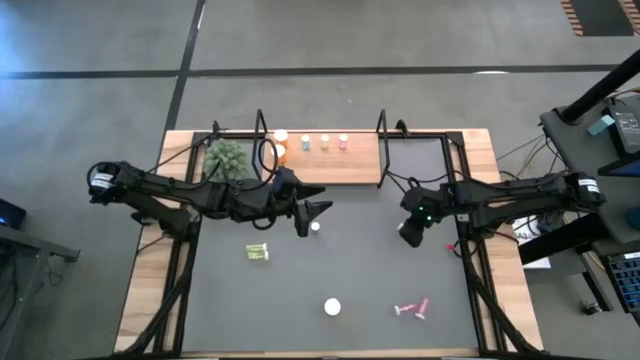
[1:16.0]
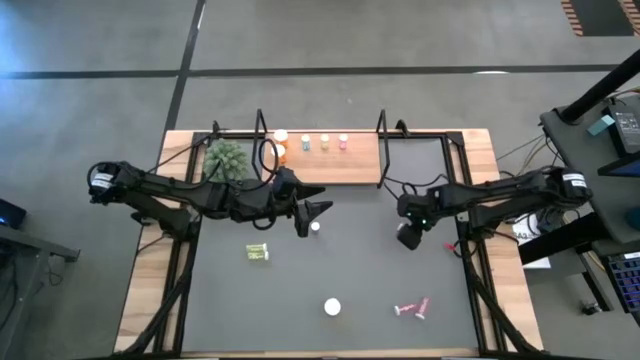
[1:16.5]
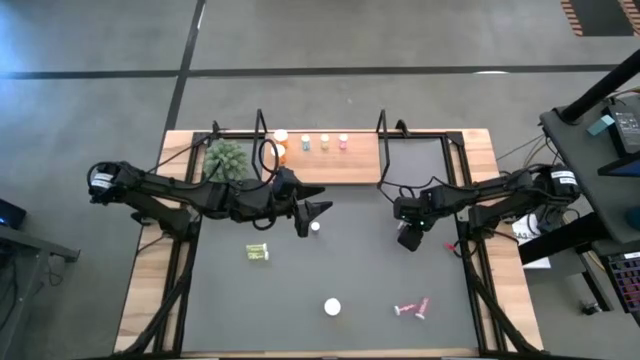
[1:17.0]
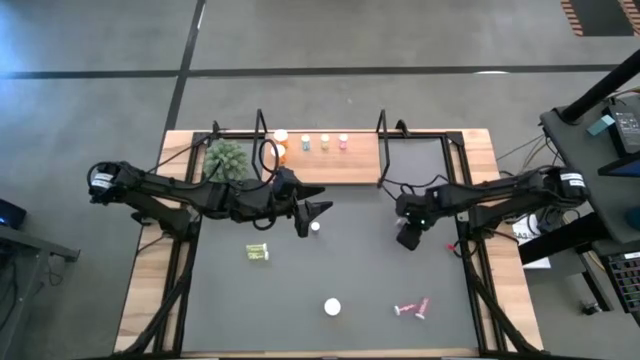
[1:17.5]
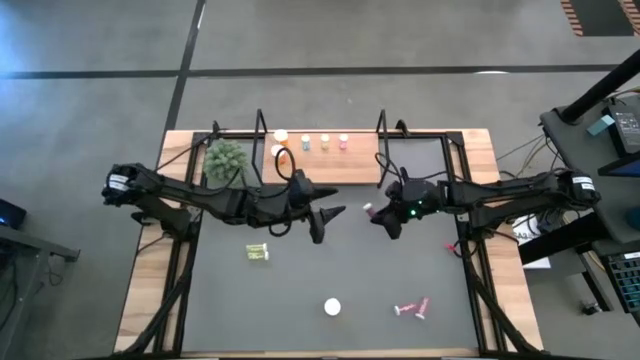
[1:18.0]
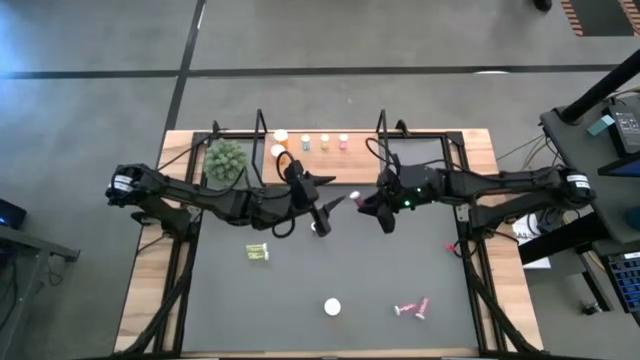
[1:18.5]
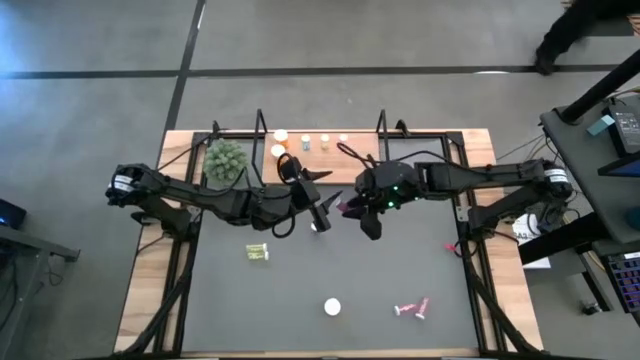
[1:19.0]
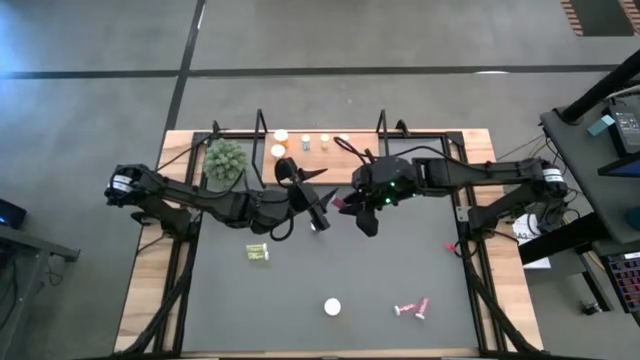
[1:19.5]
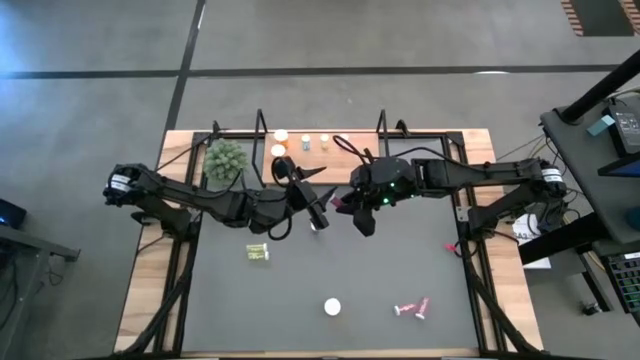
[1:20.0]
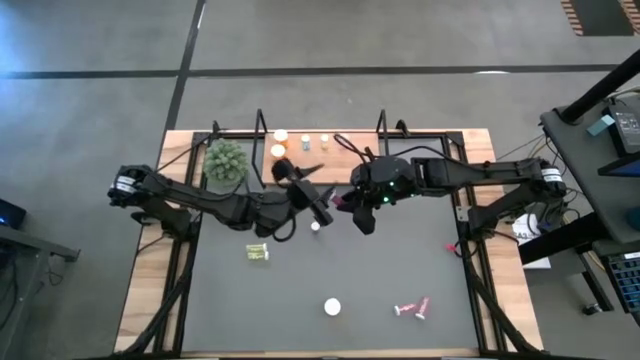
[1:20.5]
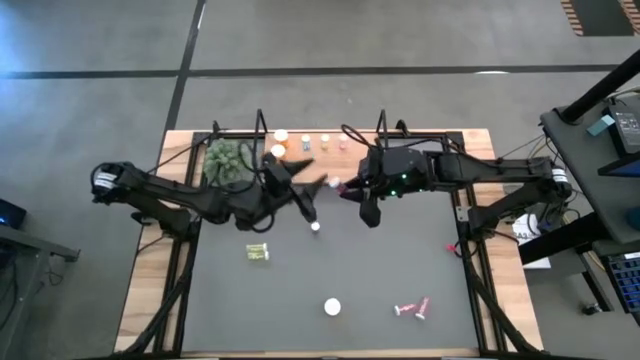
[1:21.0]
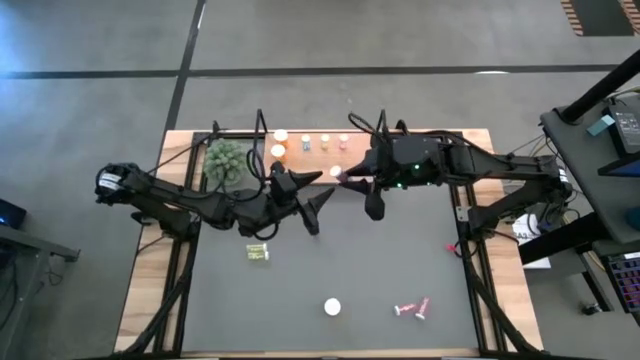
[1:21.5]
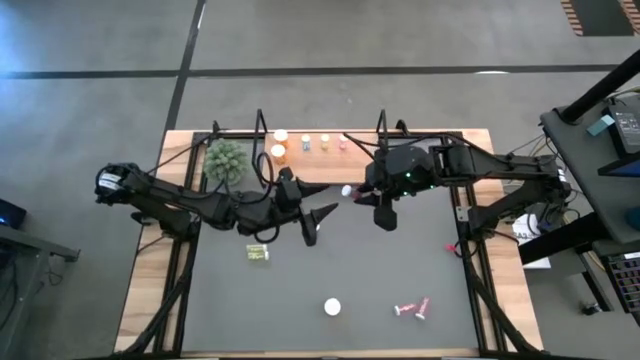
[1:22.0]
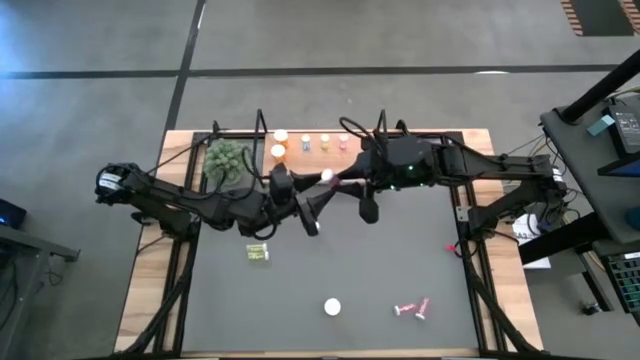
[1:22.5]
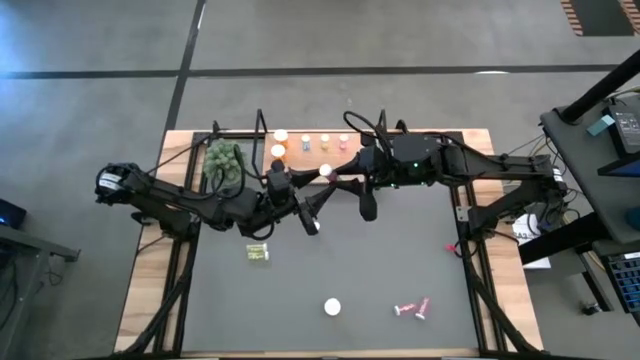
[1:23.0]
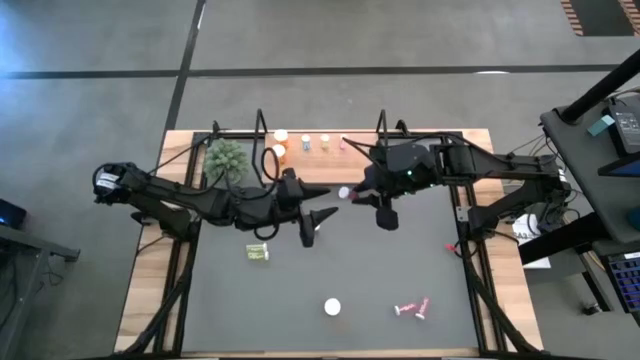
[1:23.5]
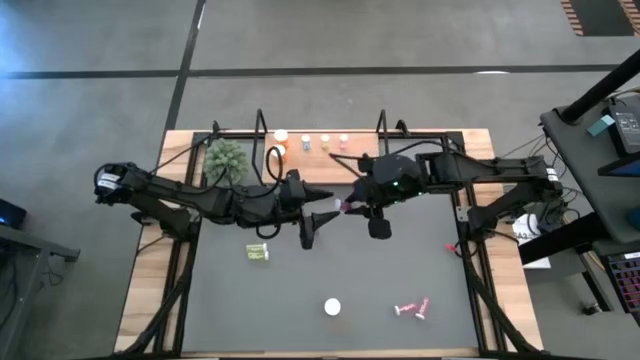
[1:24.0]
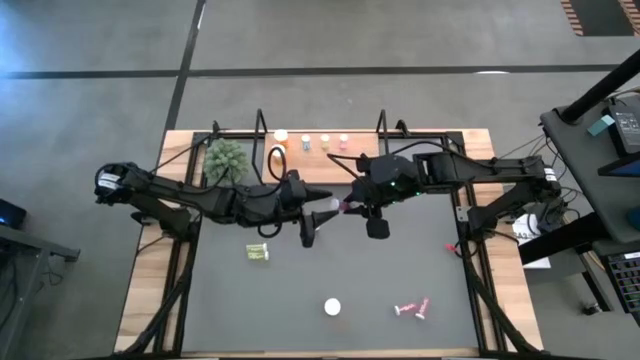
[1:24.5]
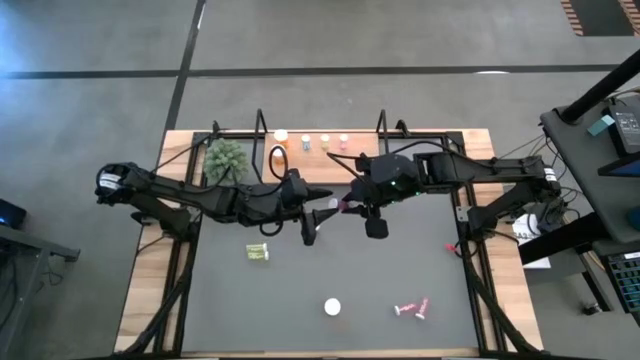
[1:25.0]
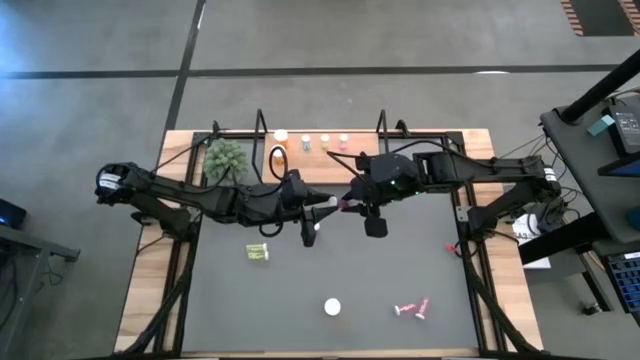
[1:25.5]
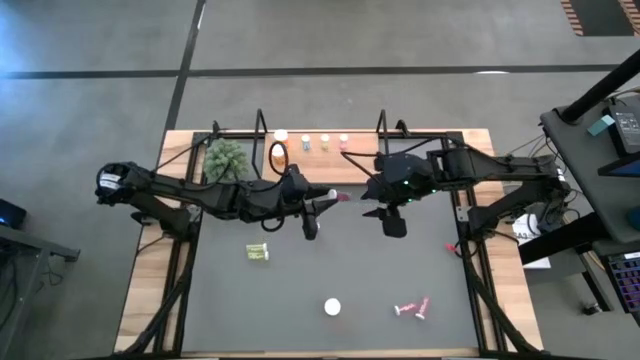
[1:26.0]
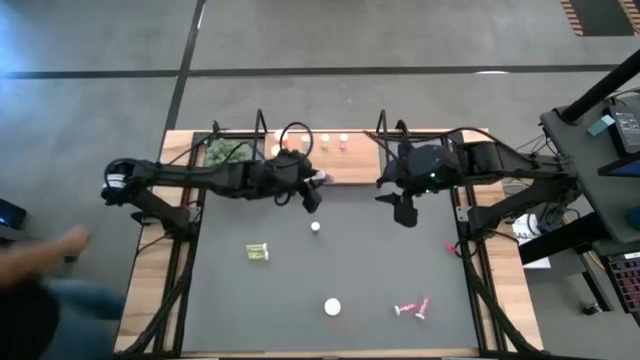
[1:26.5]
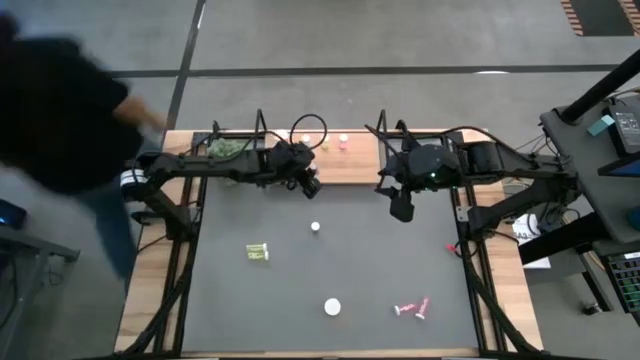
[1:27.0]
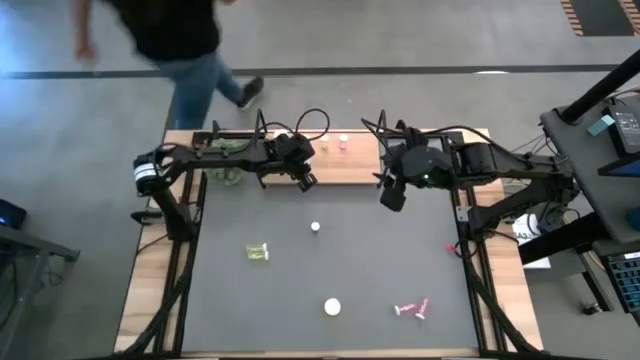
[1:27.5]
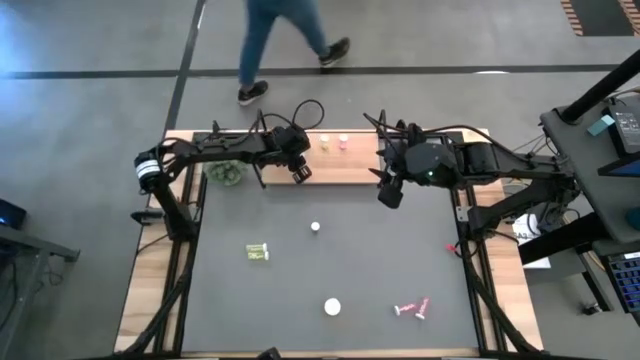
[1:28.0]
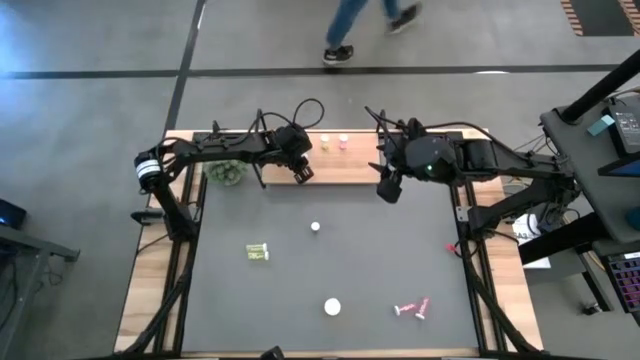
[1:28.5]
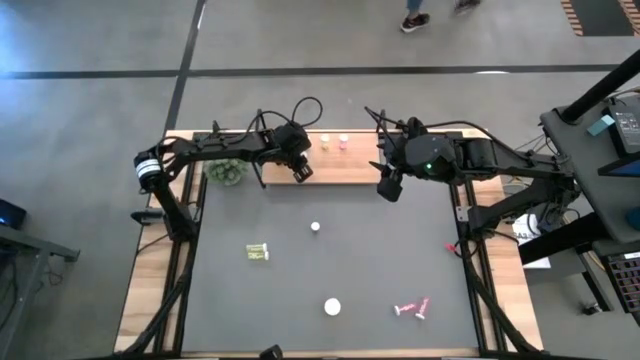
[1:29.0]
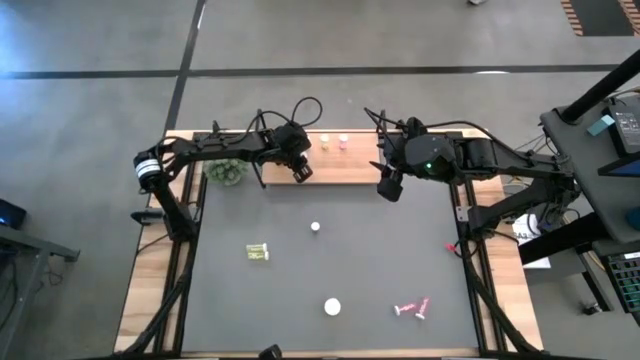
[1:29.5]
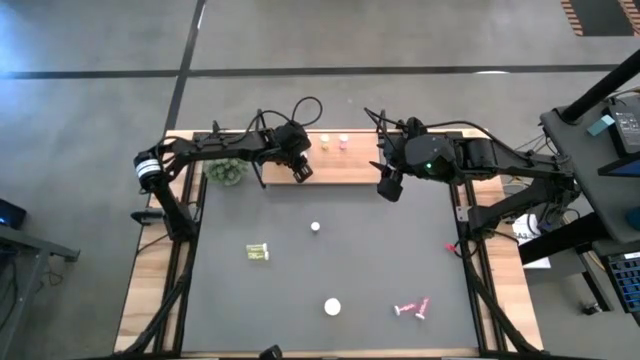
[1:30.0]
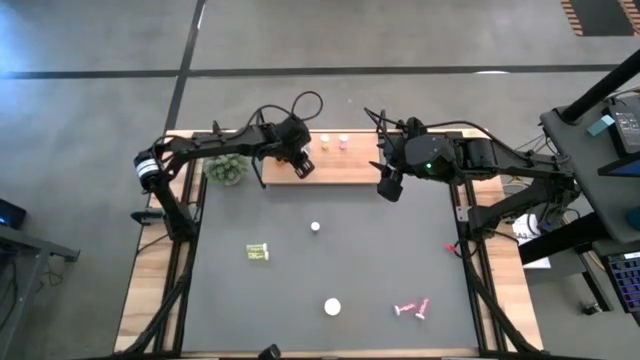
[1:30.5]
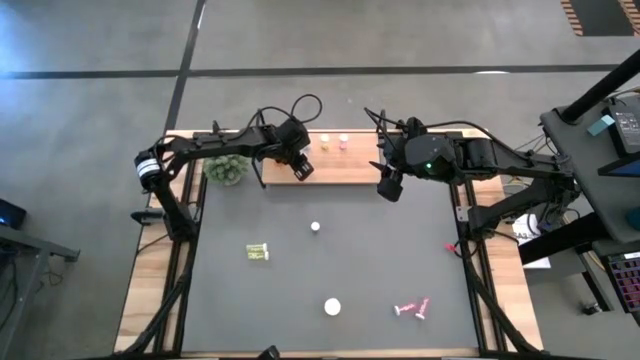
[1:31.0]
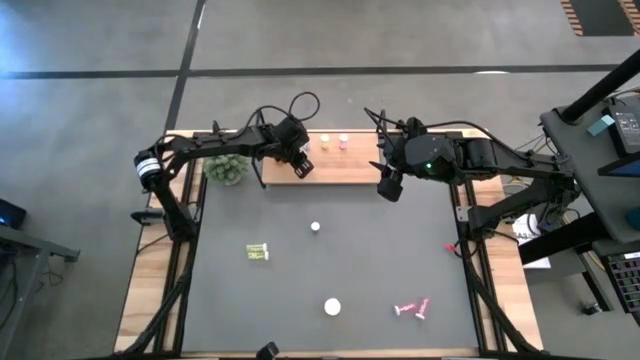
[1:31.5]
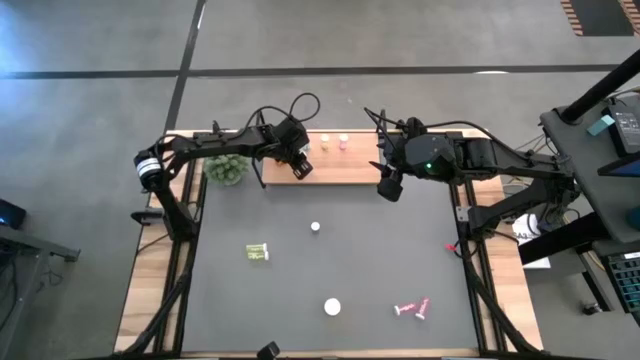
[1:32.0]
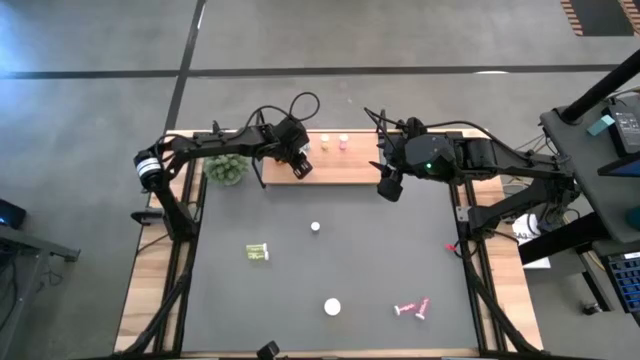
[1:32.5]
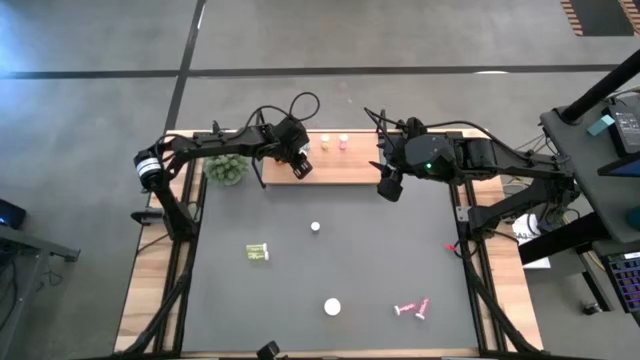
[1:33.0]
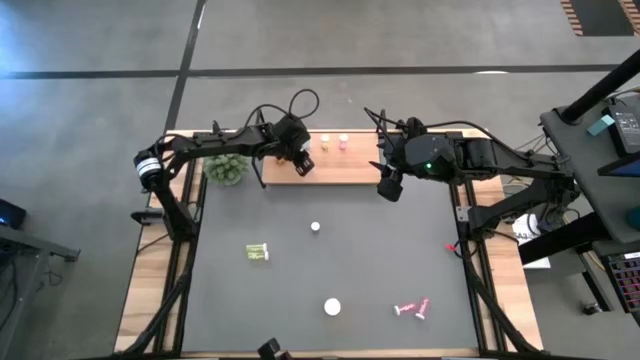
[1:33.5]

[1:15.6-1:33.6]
Task: Pick and place medicine bottles onto shelf by color
Put the right blue pill bottle on the shelf aligned with the other blue pill bottle

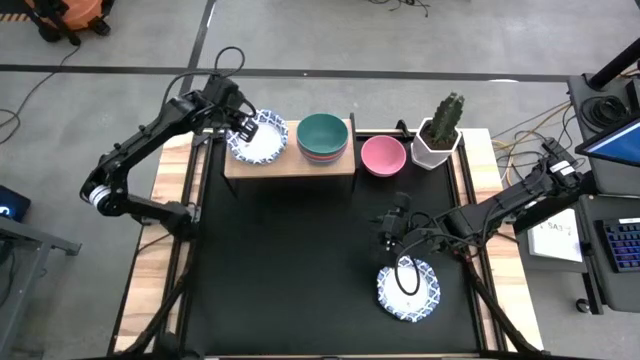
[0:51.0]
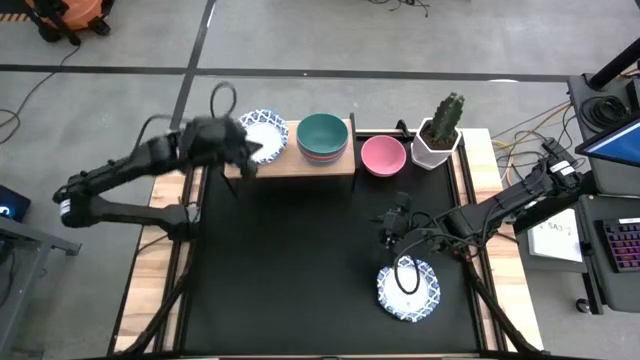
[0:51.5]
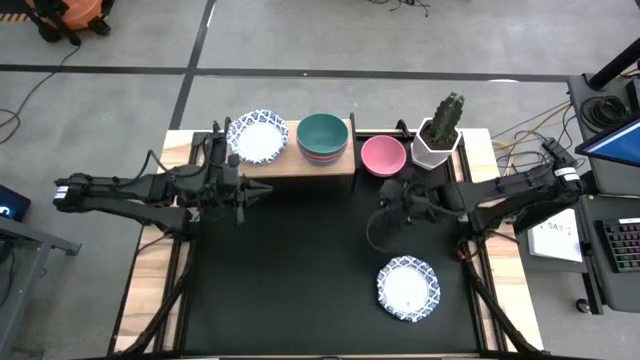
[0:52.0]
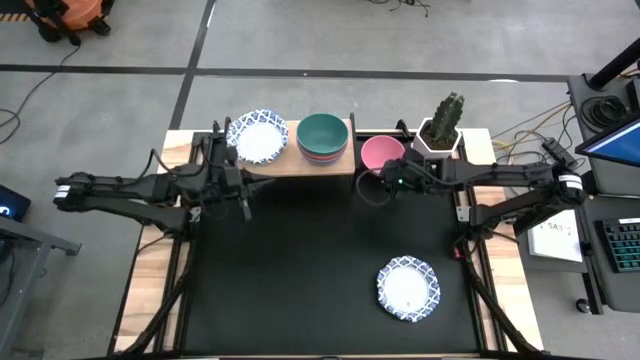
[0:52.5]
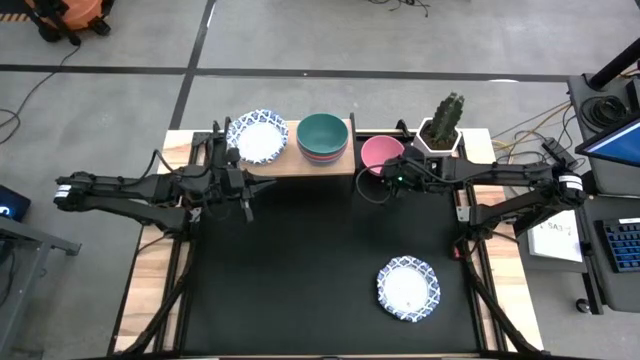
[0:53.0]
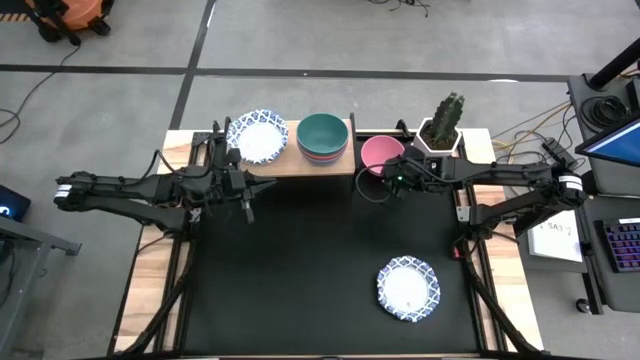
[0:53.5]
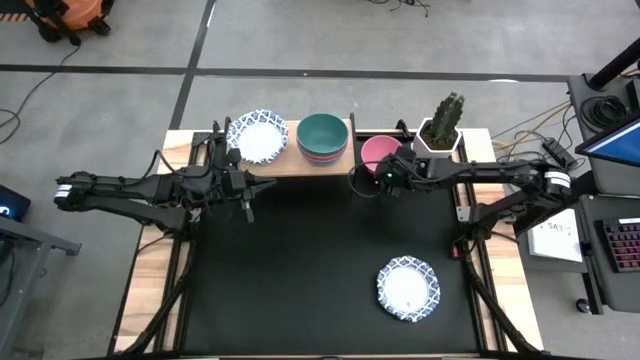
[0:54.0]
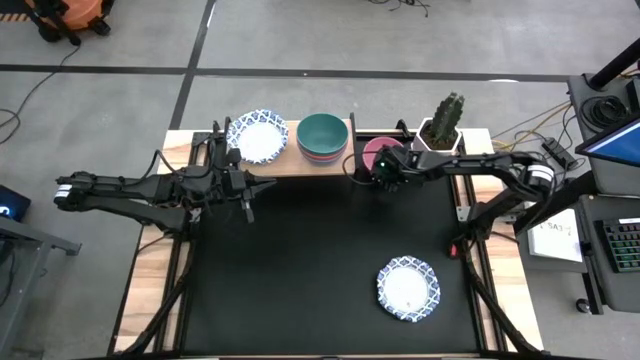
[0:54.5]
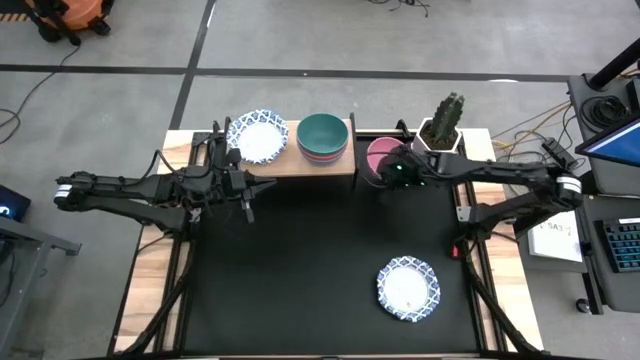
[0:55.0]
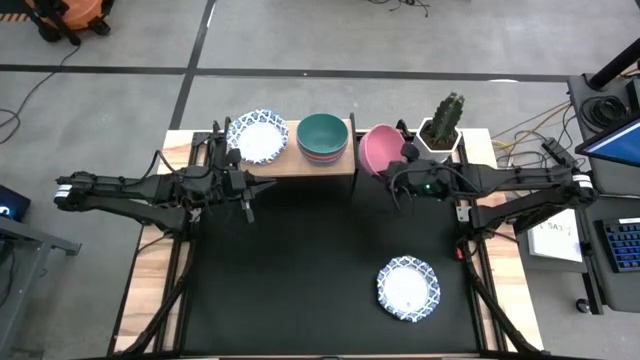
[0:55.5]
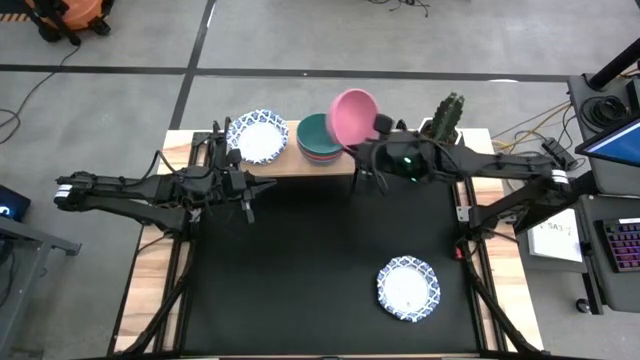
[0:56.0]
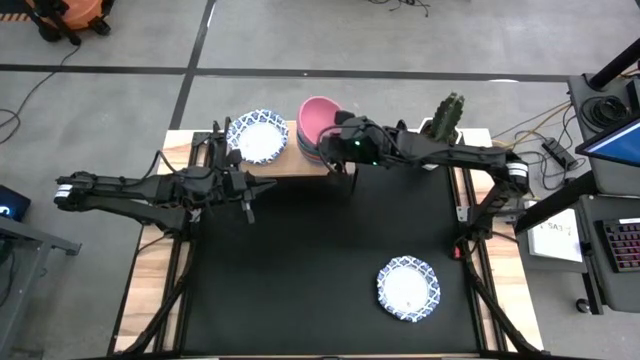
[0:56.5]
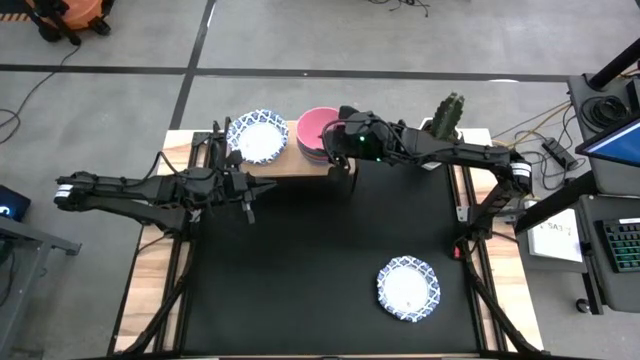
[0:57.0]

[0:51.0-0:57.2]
Task: Place and stack bowls onto a shelf
Stack the pink bowl on top of the green bowl on the shelf
